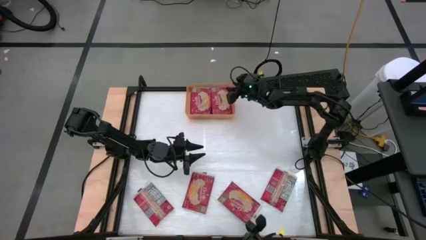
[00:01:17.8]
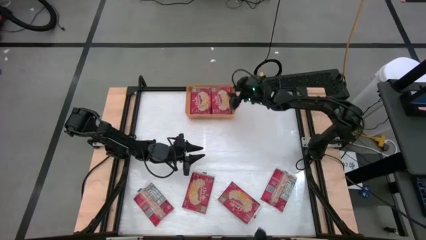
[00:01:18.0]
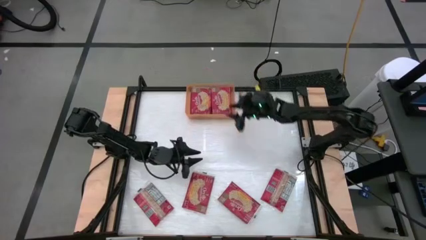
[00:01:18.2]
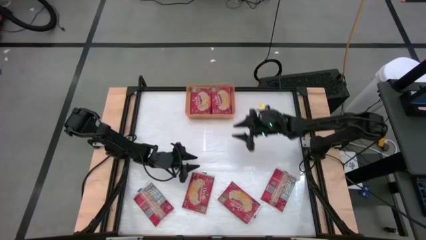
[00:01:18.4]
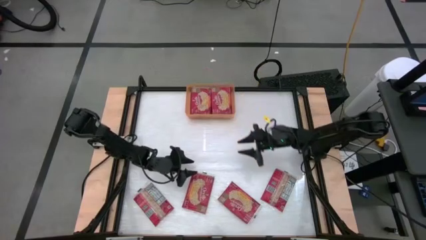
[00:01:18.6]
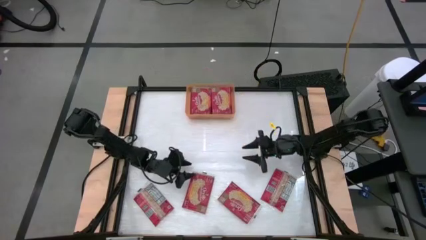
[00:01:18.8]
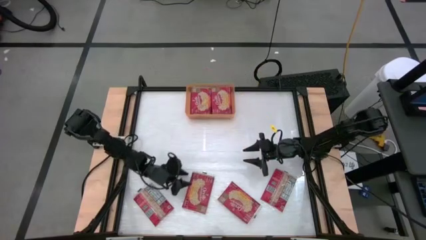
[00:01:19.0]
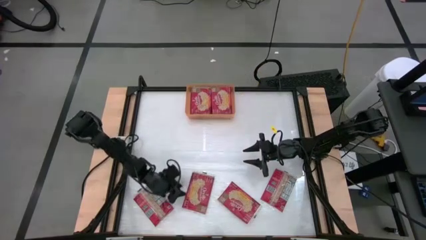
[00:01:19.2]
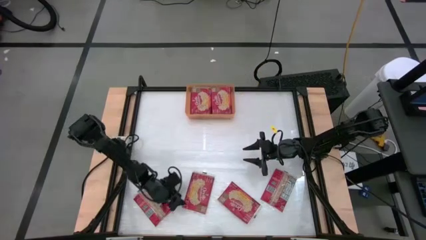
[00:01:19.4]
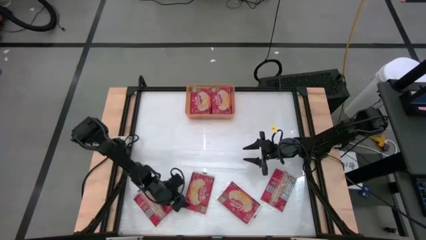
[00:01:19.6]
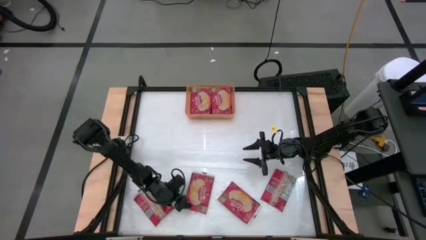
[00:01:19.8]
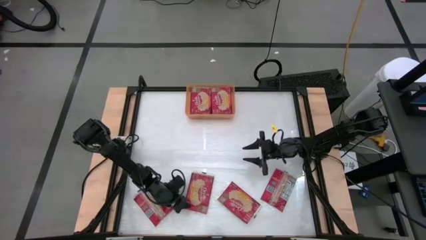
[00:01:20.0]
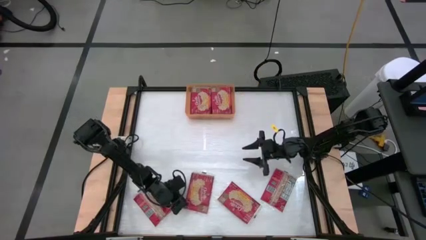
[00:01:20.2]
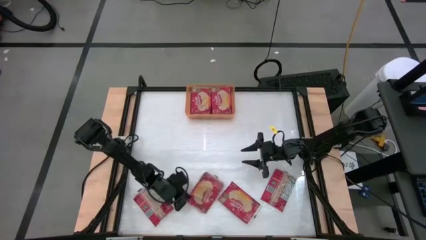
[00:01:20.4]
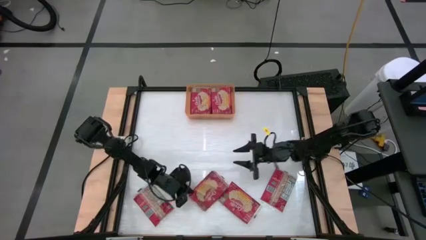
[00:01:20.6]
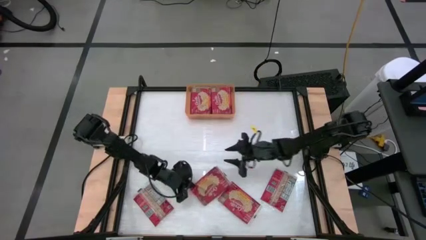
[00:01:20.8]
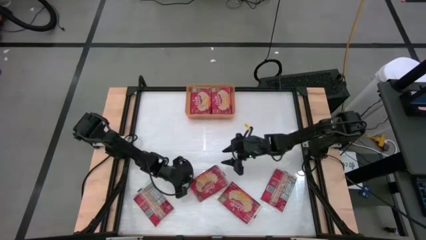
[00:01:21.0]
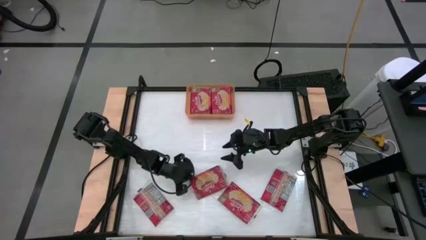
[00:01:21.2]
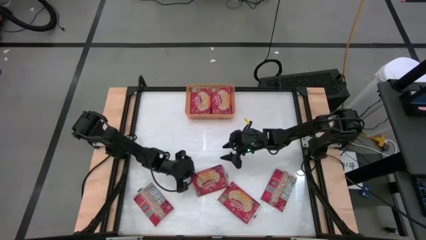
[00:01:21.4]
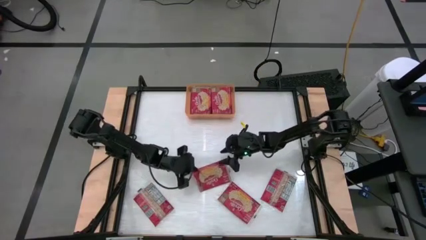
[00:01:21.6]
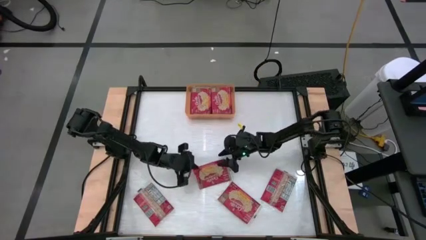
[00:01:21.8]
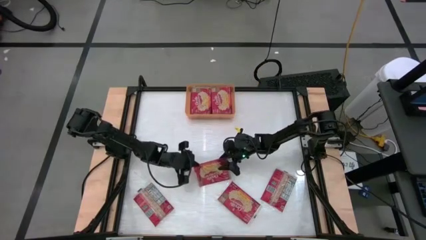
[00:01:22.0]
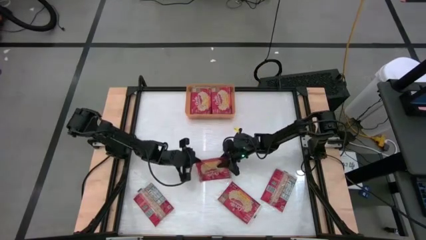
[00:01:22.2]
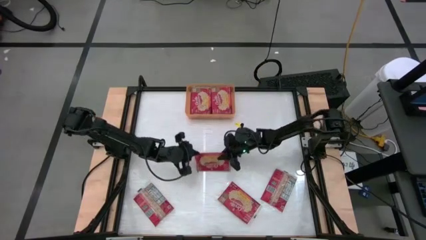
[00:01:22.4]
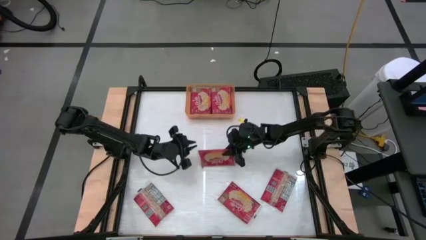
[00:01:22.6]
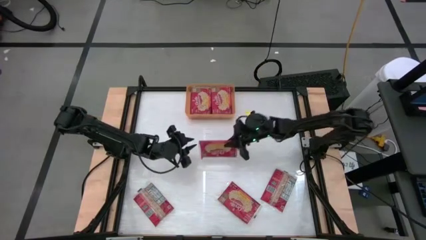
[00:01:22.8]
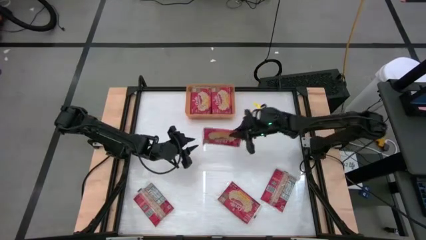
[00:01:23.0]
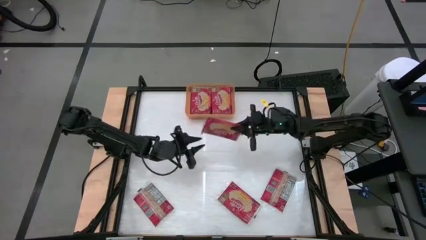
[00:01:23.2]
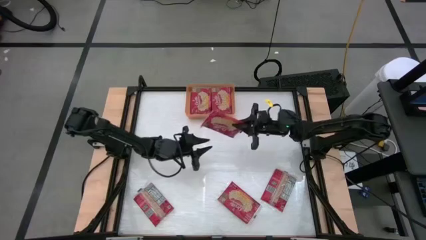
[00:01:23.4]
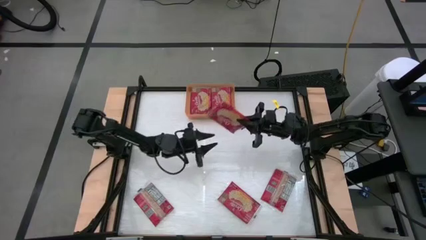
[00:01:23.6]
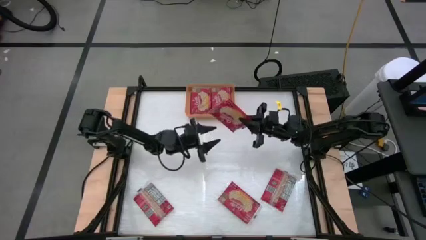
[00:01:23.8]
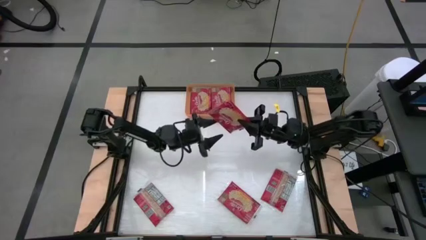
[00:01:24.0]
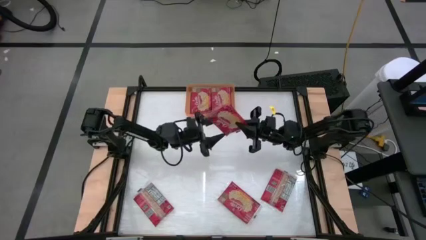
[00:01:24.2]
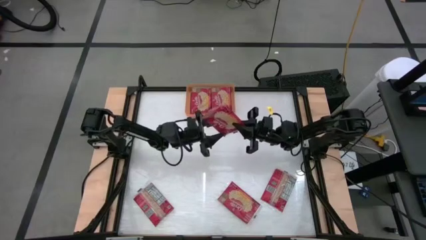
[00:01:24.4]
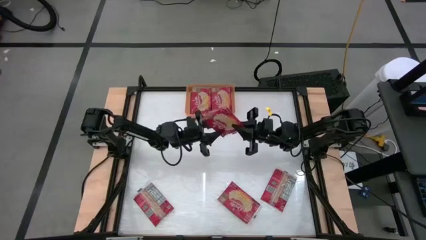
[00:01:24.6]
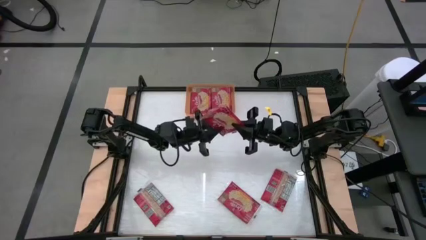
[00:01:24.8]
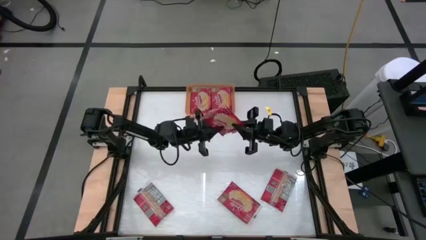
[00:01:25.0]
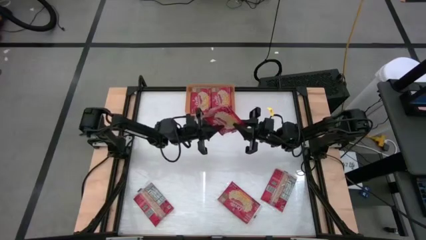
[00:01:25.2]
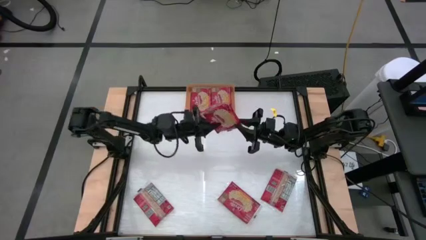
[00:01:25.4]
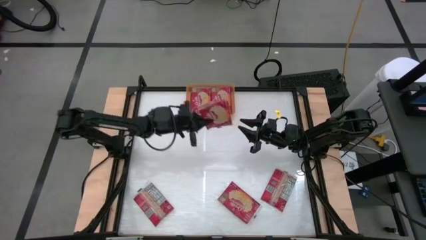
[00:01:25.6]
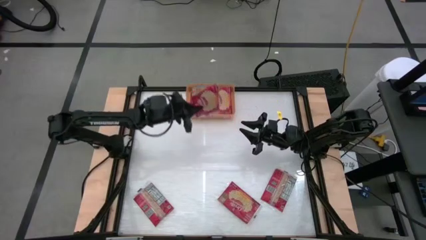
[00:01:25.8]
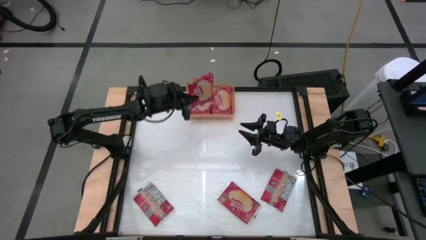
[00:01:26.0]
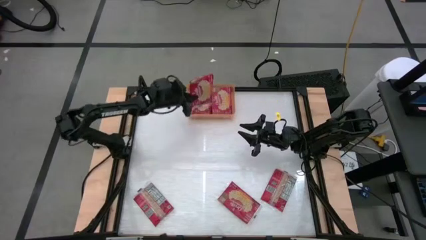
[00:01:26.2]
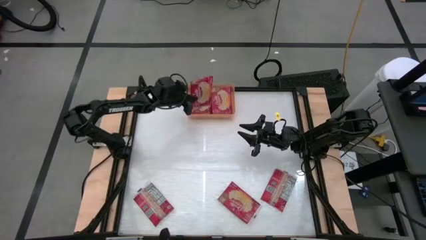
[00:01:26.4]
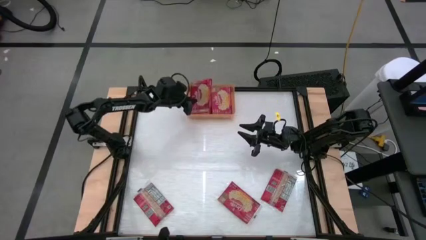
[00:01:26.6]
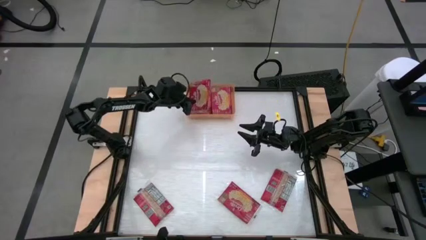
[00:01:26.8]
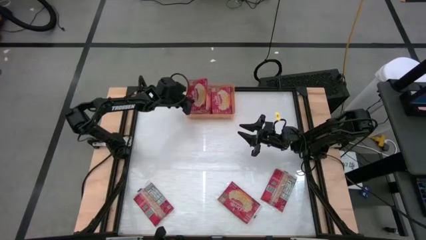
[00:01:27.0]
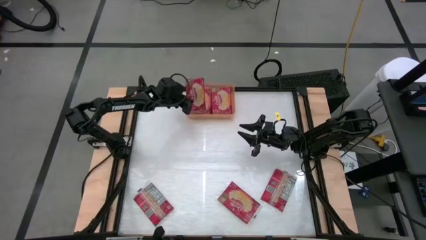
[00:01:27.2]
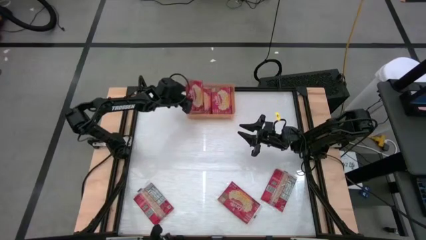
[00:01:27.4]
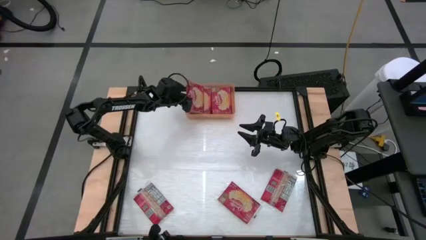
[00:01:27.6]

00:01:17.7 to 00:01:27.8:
Task: Sort popcorn bags into baskets
Put the red popcorn bag into the orange bin

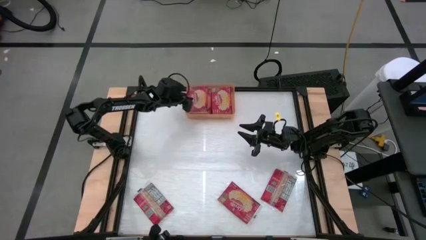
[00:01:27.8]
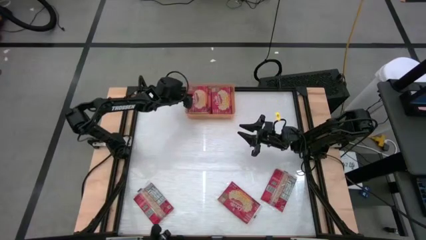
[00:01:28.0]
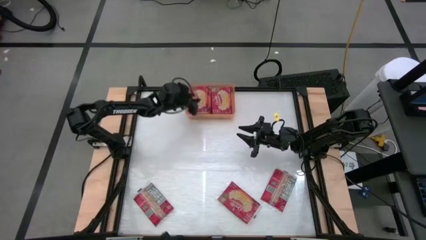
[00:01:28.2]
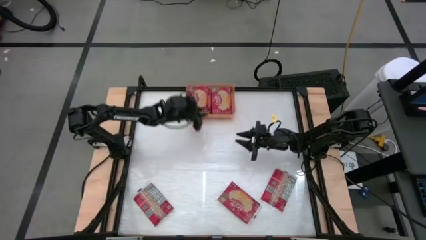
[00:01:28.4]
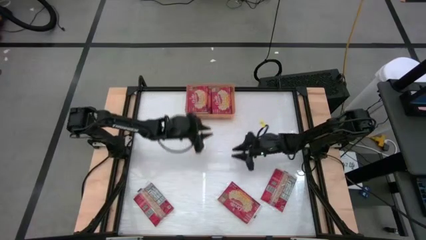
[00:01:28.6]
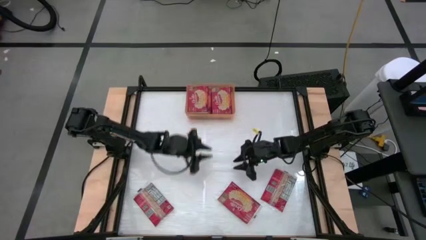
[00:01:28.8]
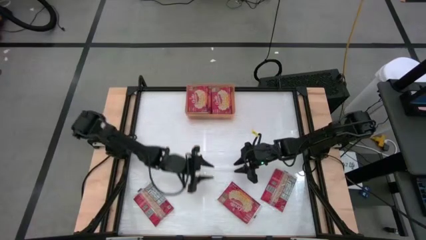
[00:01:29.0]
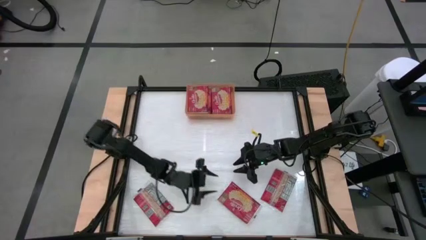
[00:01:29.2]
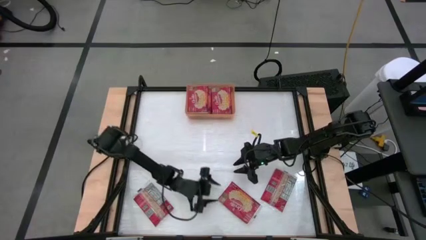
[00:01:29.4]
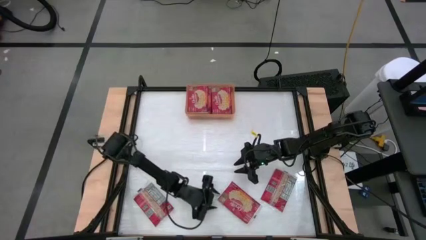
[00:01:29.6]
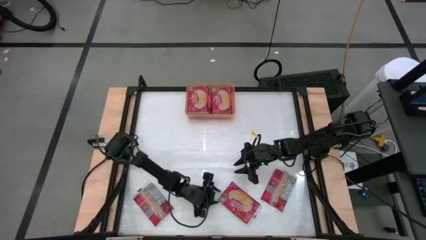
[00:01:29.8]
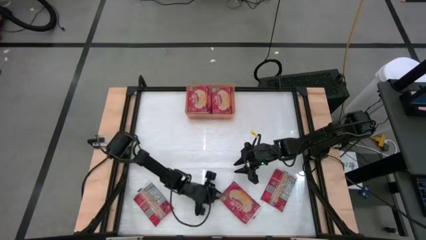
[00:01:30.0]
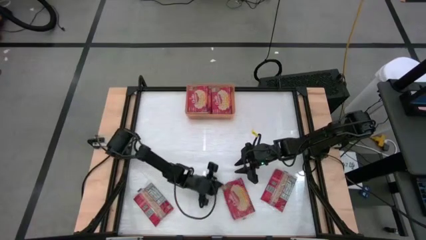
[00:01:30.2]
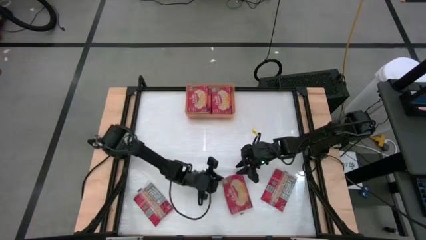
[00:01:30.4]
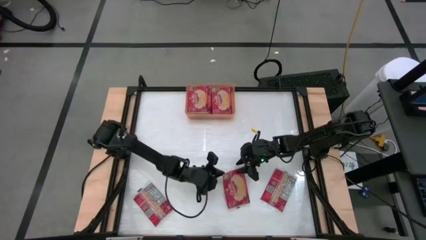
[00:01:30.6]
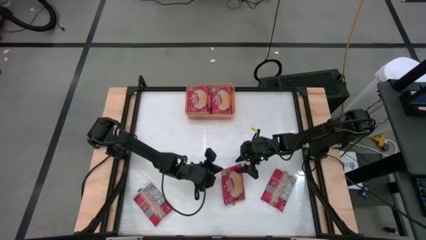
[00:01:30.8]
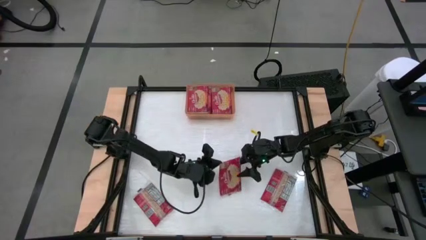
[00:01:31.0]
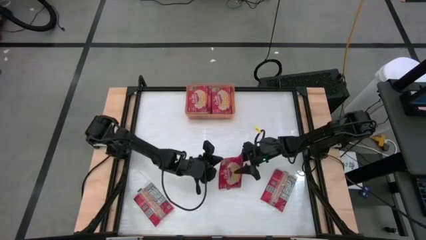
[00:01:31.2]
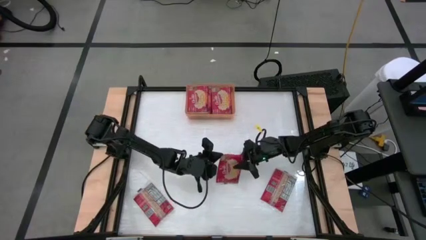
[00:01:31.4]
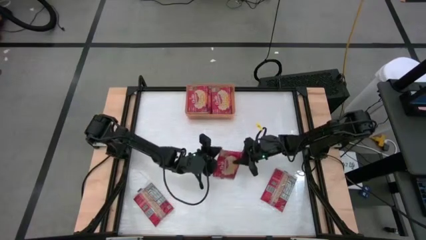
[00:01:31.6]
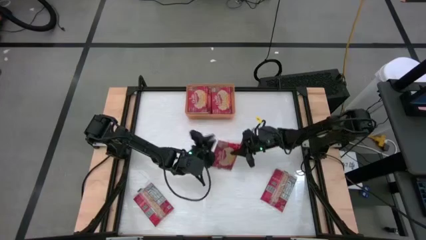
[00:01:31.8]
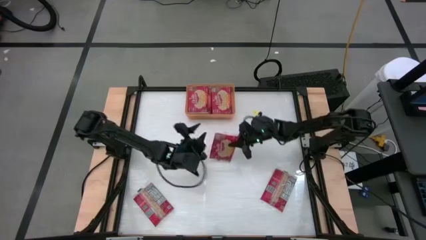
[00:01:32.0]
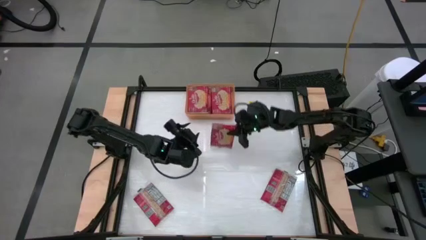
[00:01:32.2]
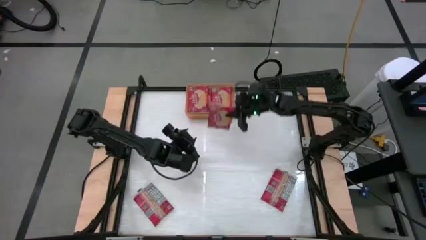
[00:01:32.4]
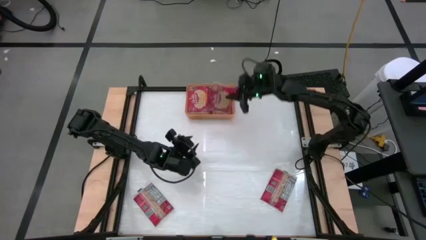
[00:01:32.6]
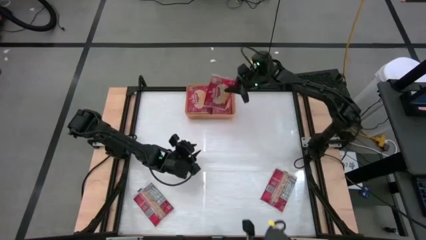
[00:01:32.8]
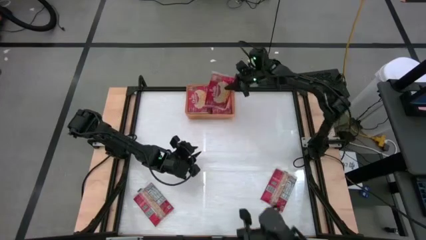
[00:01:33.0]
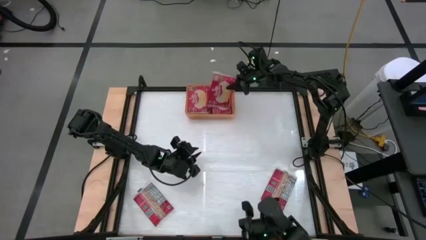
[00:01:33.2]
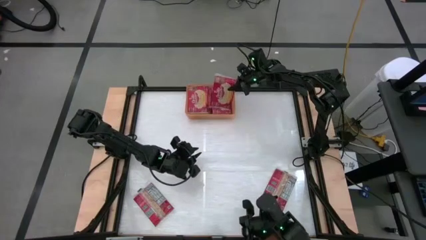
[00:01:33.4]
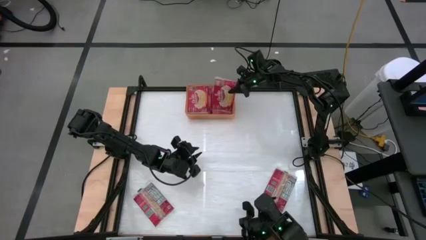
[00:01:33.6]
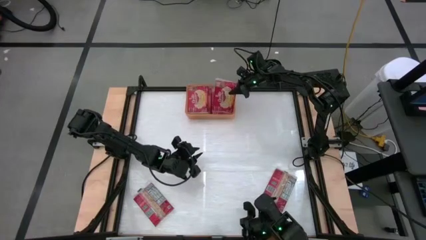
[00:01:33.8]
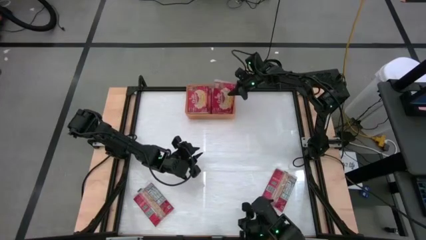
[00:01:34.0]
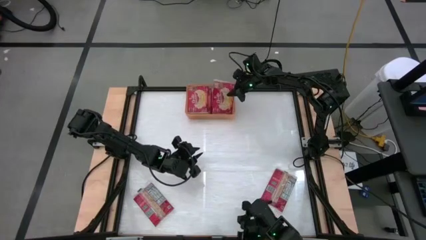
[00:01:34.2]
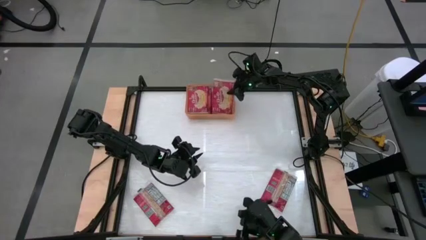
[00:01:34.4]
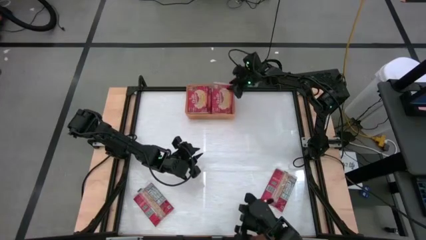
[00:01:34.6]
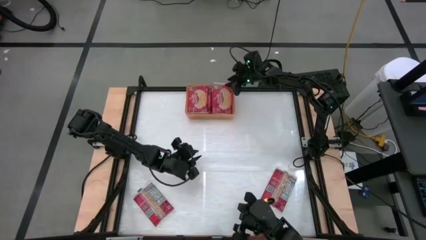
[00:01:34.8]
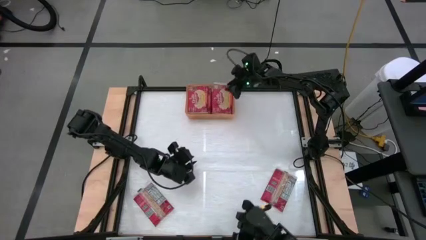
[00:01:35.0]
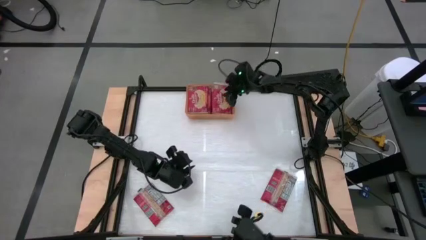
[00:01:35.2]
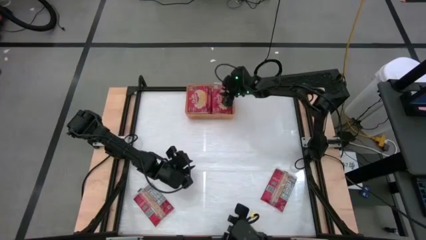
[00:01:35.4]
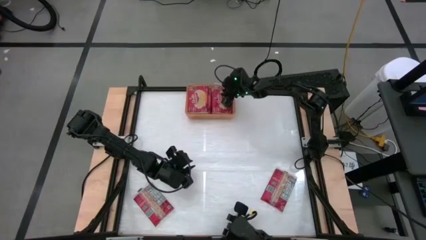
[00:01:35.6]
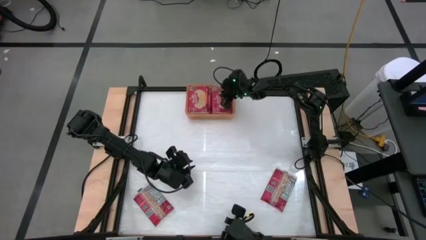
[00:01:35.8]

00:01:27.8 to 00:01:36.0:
Put the red popcorn bag into the orange bin
